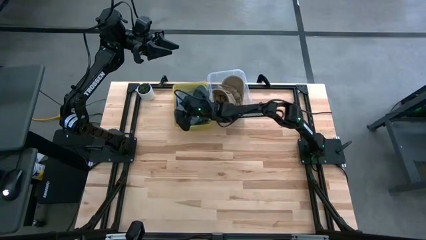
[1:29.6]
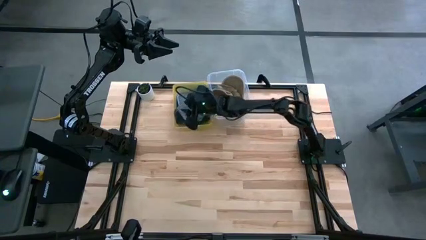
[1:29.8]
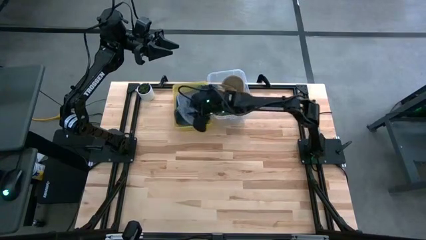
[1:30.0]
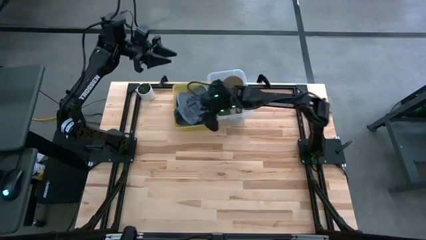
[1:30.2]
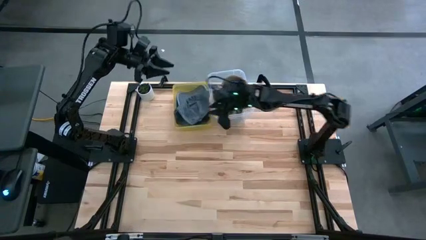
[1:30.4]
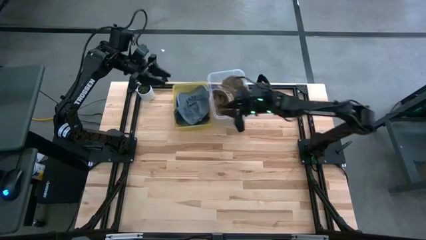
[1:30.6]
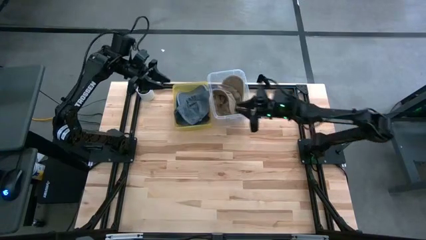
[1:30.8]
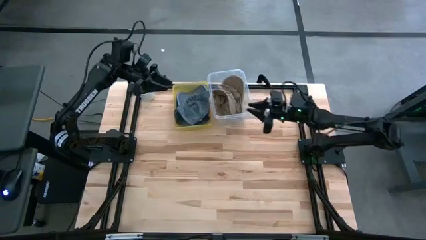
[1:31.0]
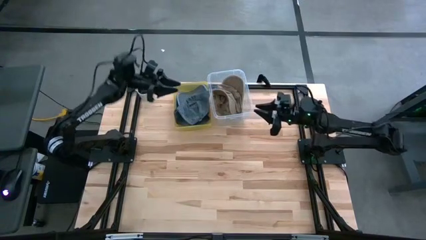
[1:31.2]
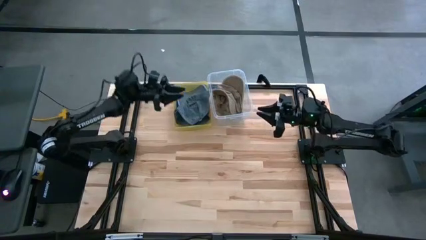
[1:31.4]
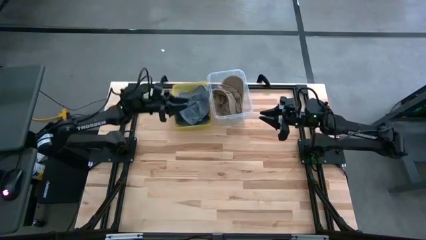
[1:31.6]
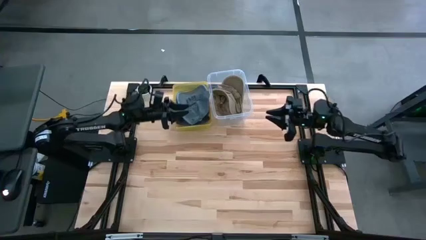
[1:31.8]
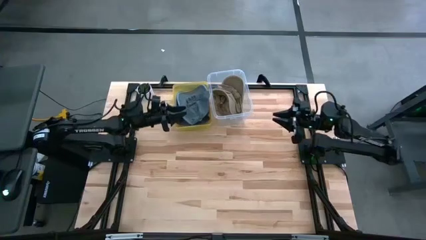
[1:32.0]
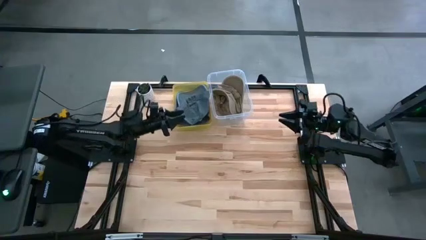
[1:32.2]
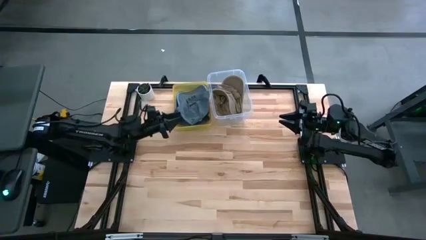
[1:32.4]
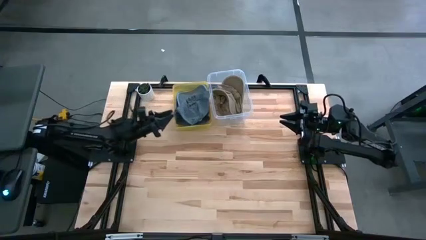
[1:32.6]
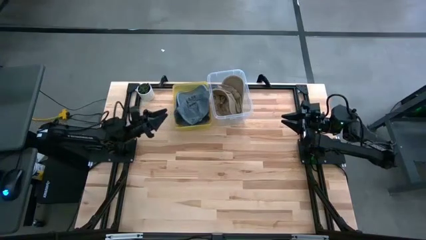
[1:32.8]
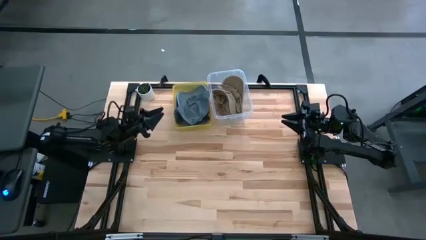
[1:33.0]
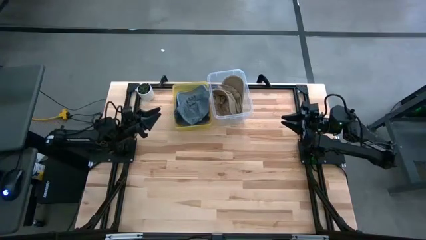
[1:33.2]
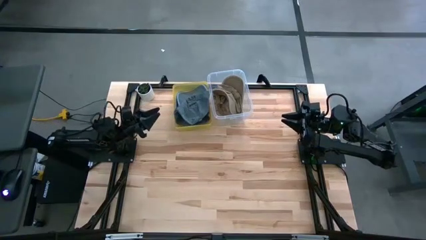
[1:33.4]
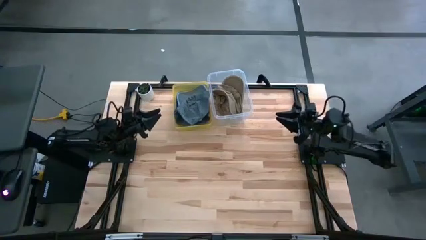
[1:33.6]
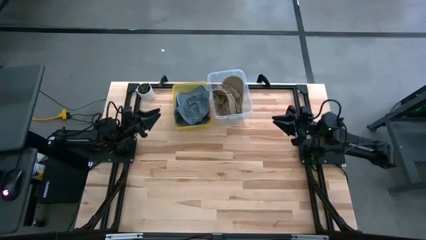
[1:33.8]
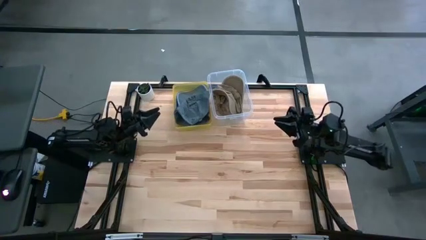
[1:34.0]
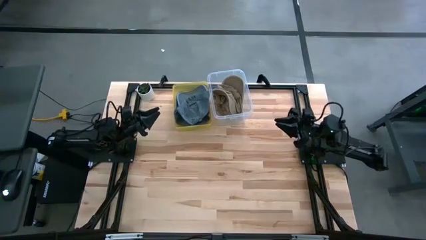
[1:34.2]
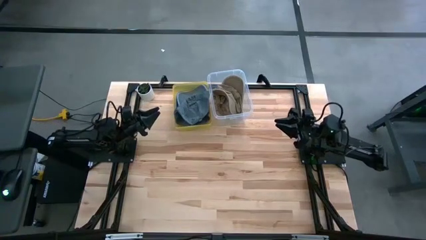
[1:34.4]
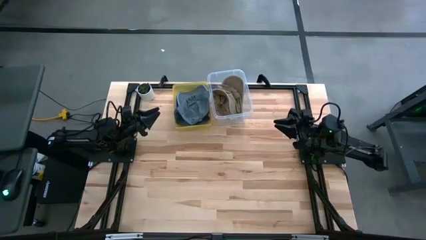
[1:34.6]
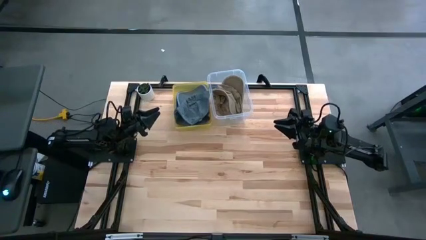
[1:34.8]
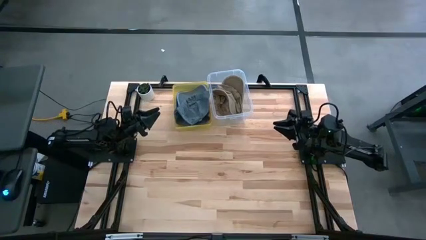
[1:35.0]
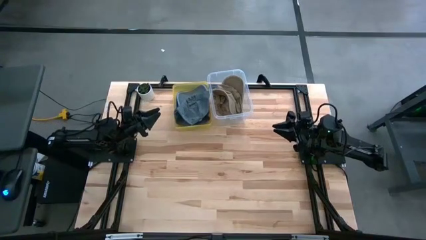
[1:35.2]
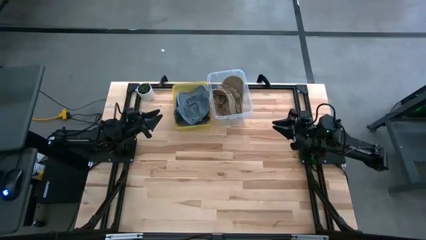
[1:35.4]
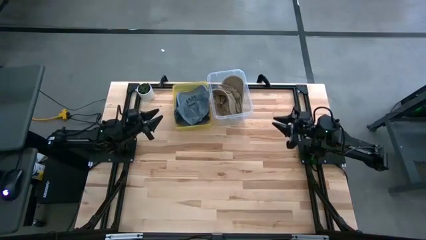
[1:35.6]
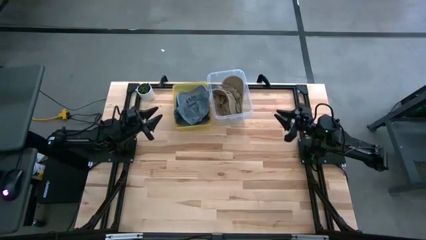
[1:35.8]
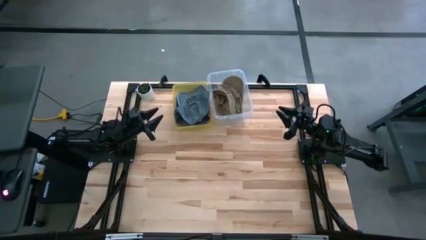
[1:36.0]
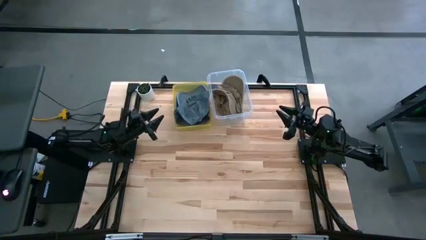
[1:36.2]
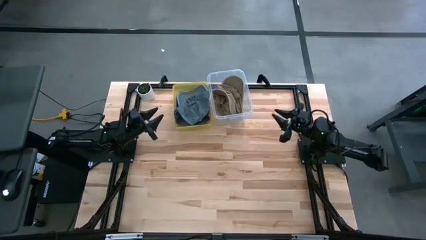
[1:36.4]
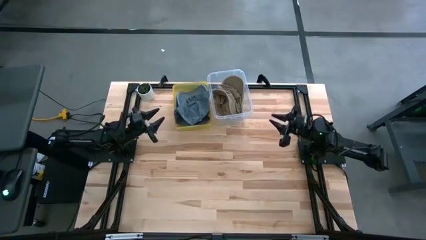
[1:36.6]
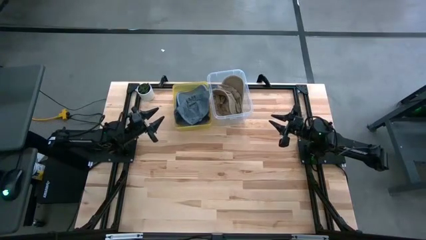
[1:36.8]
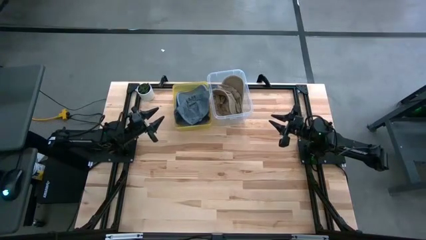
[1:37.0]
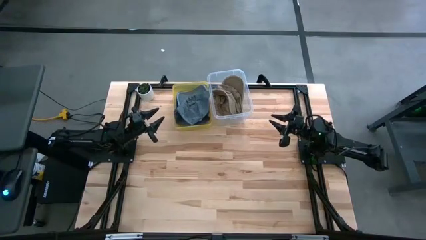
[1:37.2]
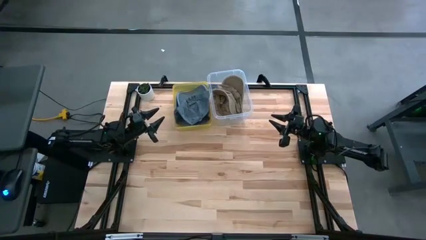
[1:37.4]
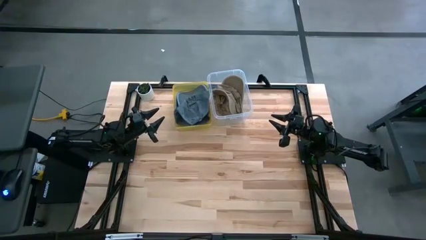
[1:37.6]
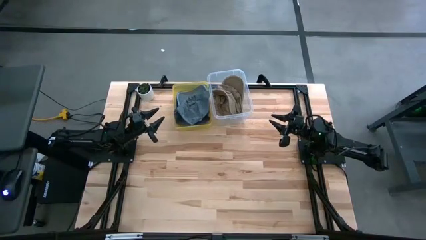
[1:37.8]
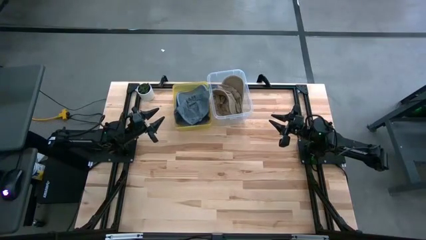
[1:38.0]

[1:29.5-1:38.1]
Task: Pick & Place hat
Return to Home Position

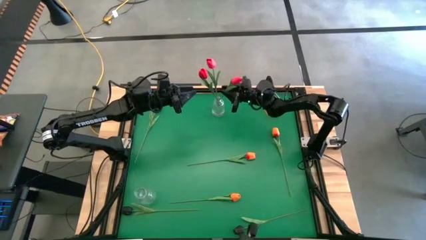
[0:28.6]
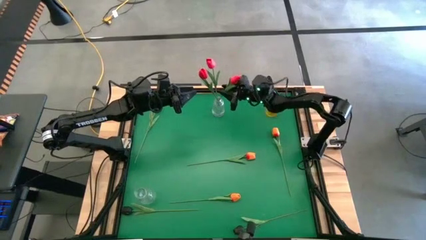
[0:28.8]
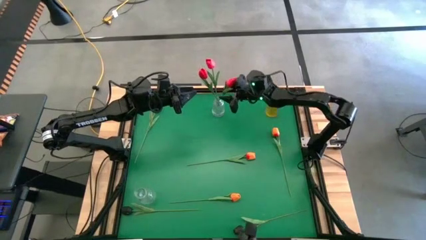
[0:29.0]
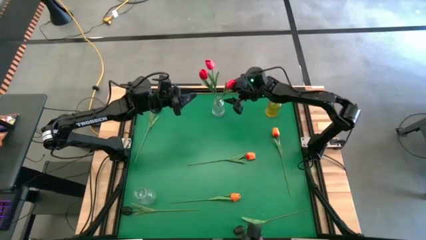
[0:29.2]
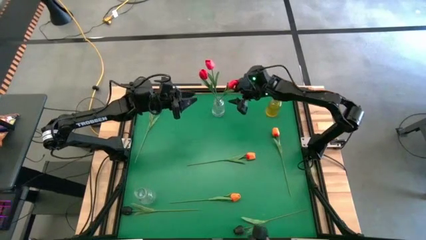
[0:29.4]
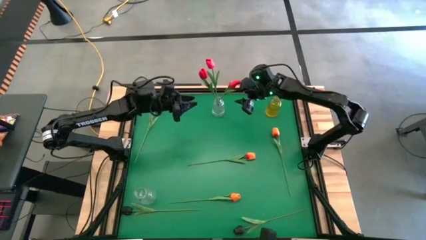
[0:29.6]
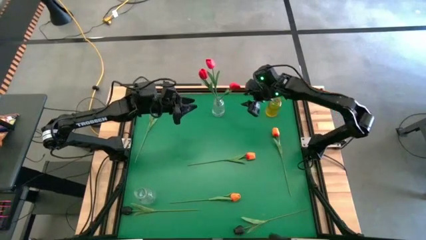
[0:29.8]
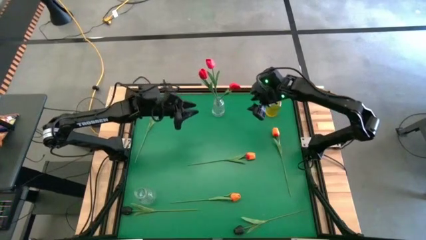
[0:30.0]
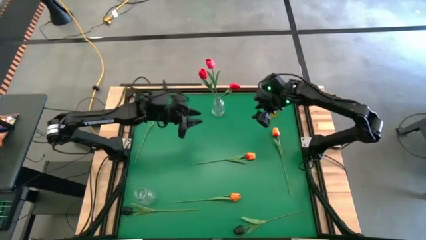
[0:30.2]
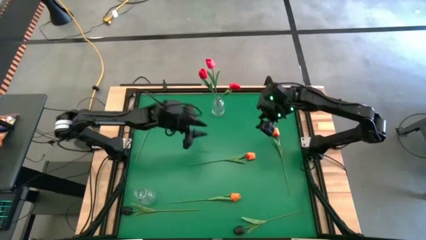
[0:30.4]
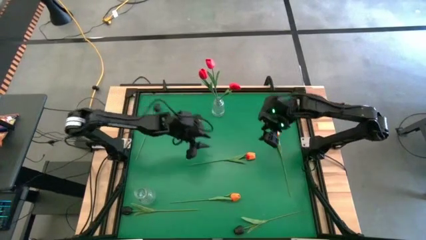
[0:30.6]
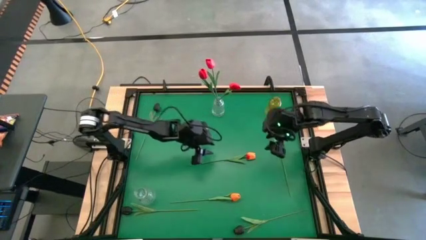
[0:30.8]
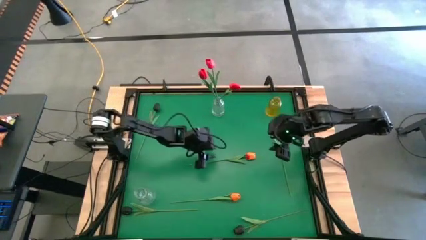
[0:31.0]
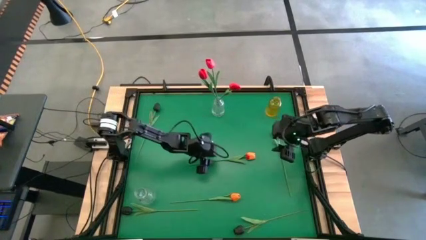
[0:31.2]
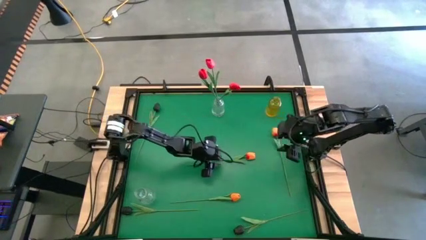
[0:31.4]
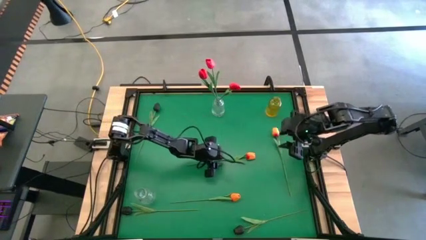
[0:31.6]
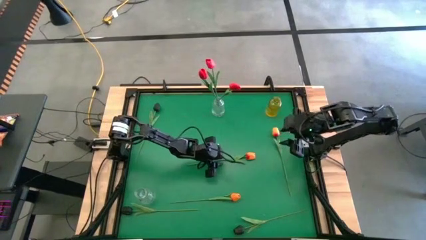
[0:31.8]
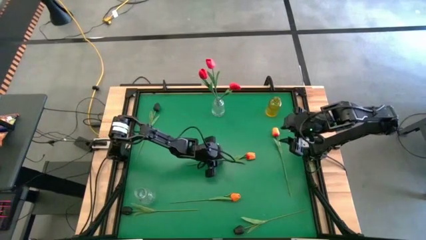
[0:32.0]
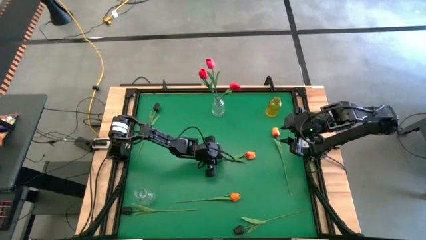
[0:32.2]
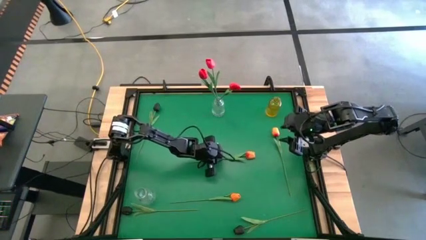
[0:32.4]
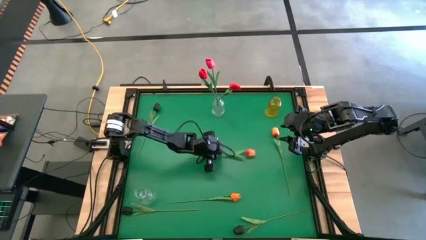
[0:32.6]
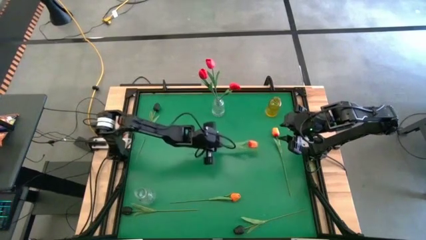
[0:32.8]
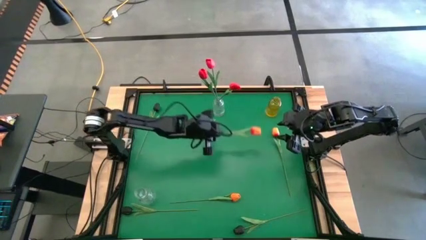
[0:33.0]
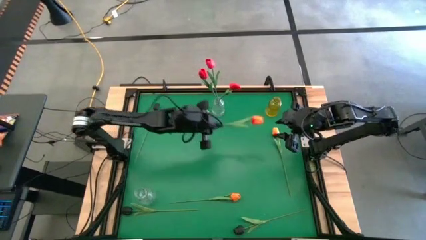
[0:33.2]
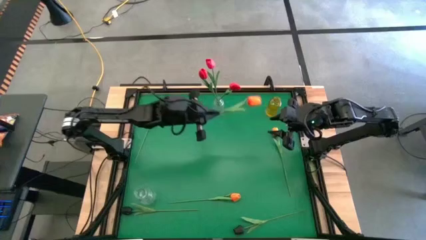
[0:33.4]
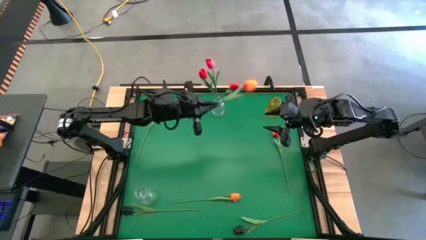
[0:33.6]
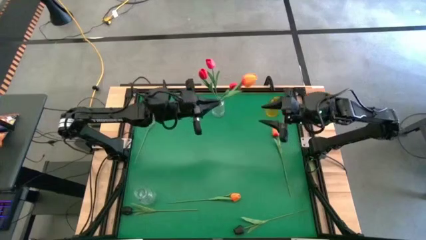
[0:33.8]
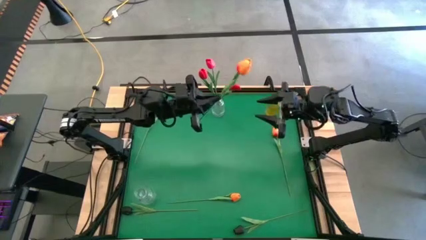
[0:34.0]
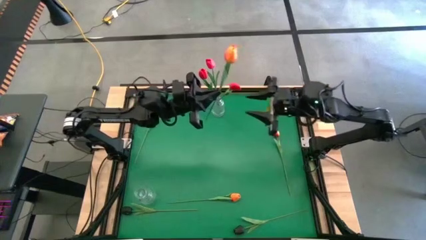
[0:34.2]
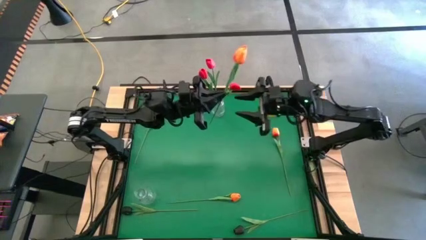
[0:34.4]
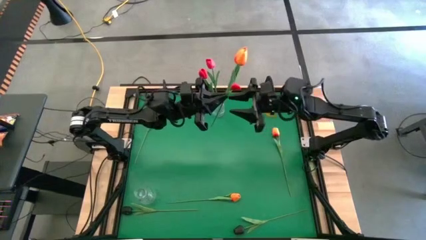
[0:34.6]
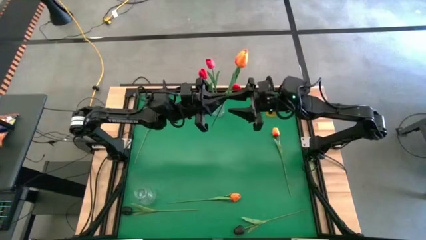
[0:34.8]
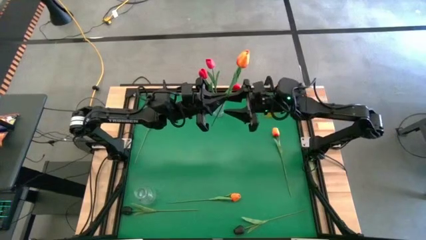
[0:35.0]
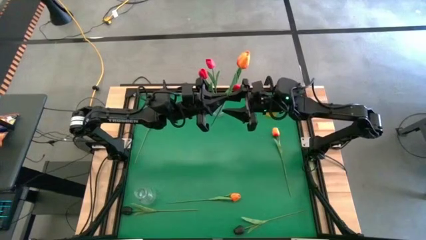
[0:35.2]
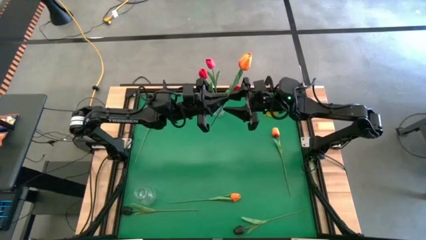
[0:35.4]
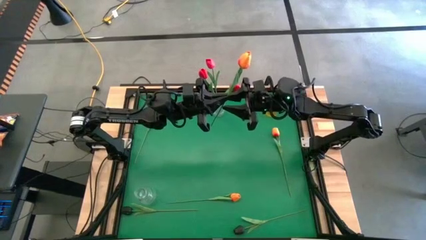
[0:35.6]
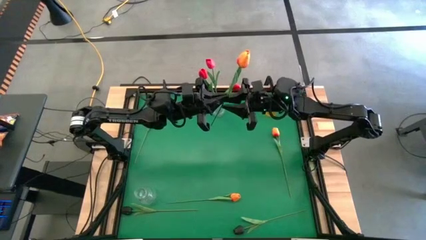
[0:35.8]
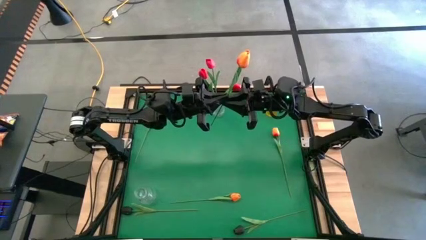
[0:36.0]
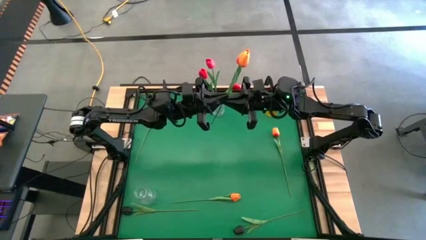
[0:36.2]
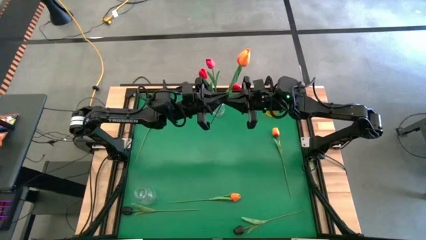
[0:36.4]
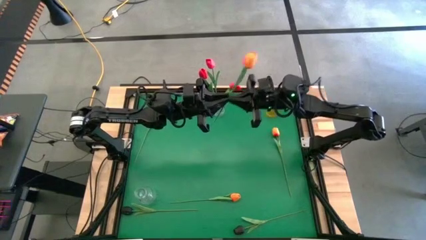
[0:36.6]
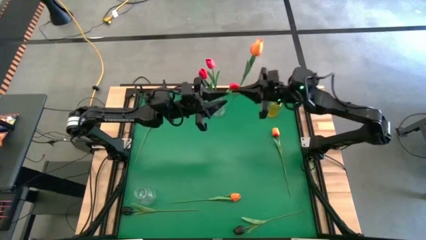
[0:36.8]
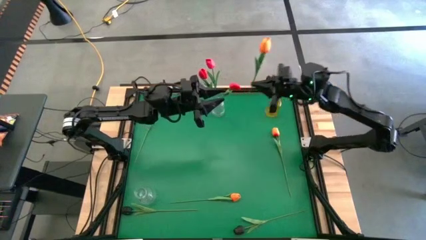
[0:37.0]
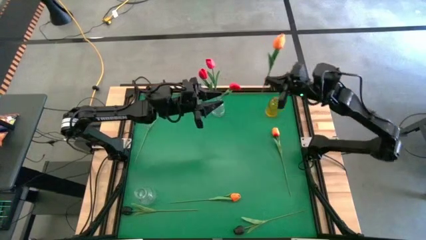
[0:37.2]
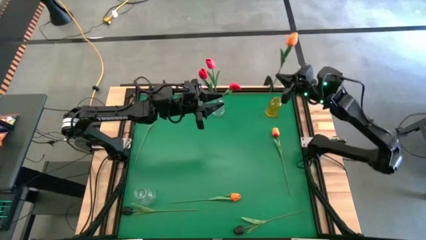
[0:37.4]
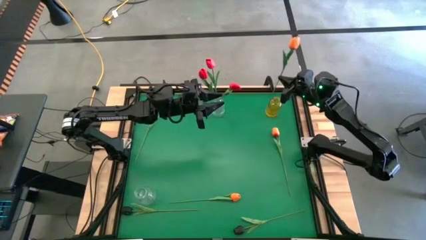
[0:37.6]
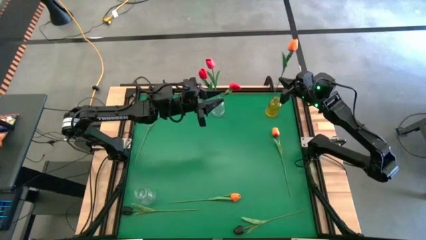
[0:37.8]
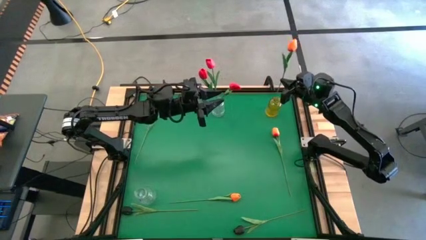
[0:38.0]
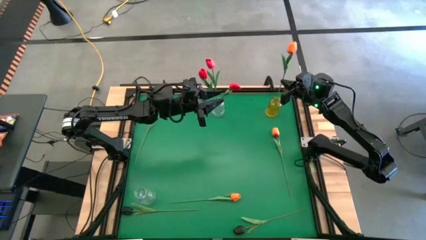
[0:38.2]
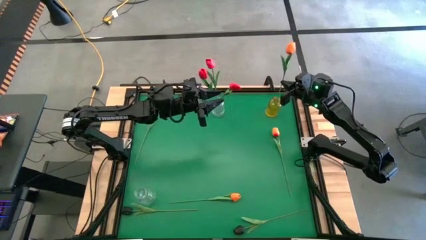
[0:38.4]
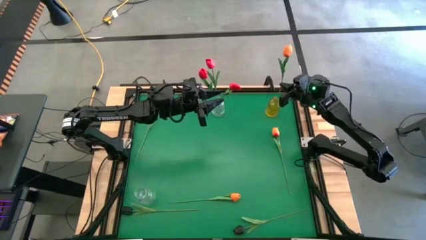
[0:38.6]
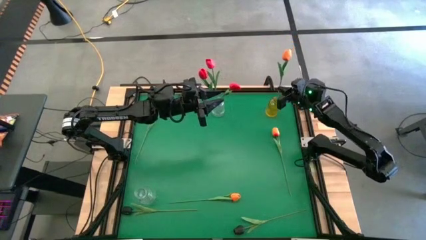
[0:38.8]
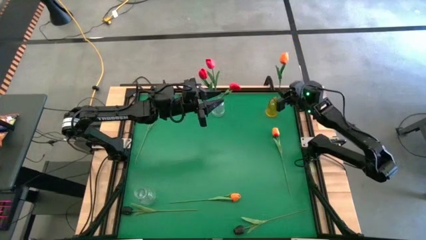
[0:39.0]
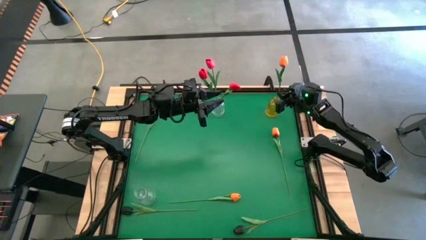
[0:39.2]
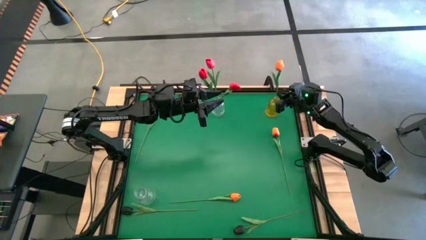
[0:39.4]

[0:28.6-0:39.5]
Task: Sort flowers into vase by color
Put the top orange flower into the yellow vase
